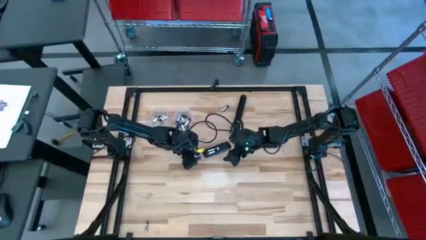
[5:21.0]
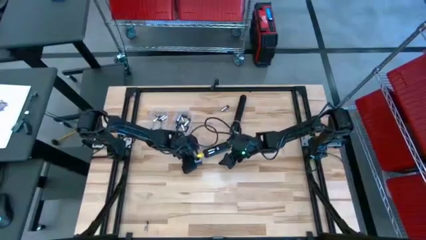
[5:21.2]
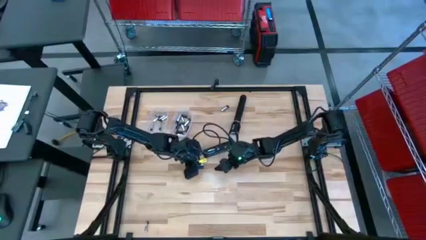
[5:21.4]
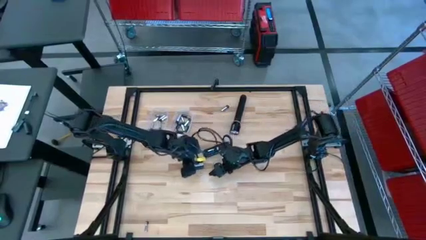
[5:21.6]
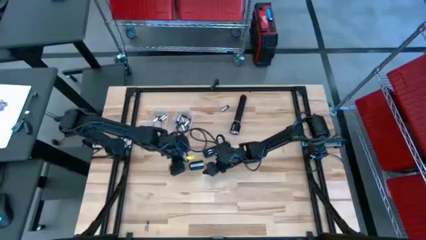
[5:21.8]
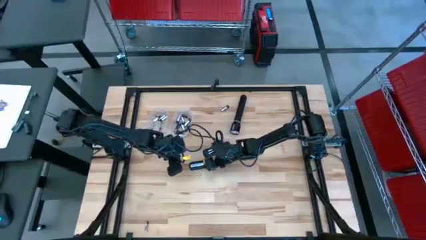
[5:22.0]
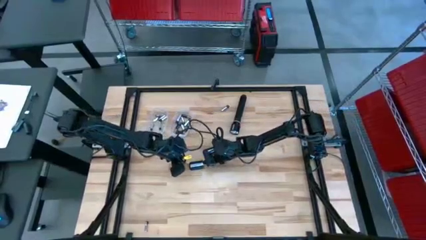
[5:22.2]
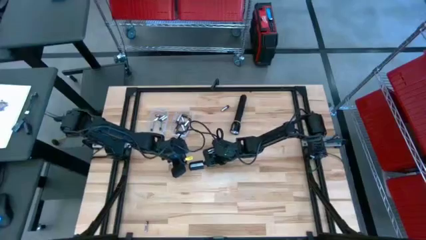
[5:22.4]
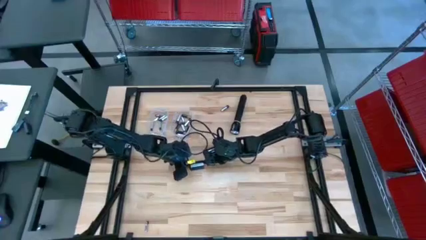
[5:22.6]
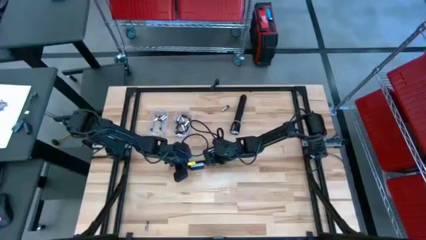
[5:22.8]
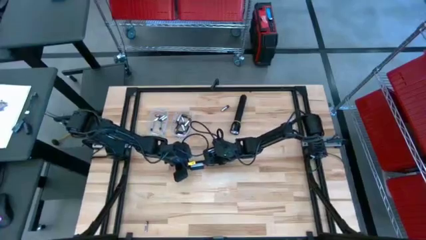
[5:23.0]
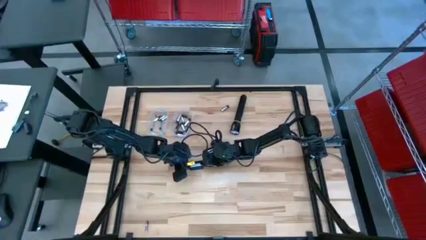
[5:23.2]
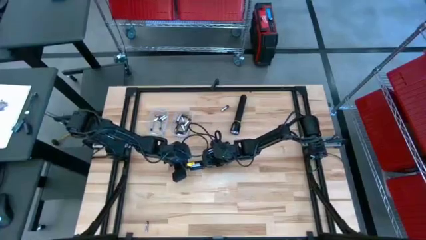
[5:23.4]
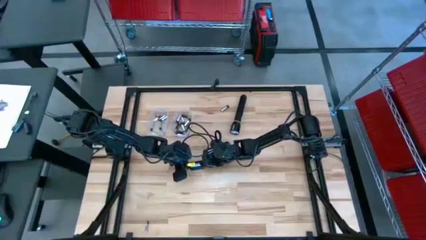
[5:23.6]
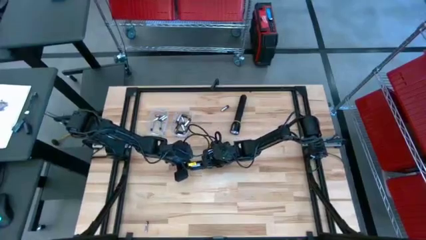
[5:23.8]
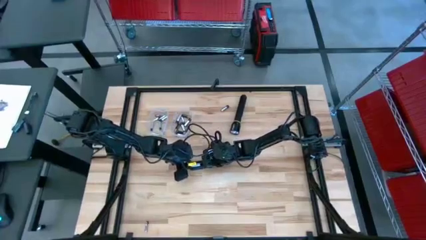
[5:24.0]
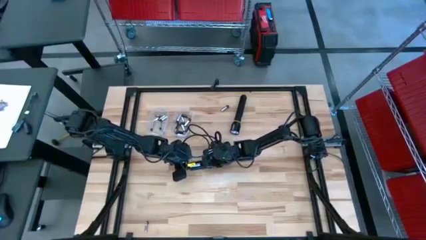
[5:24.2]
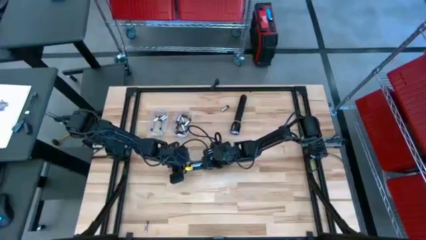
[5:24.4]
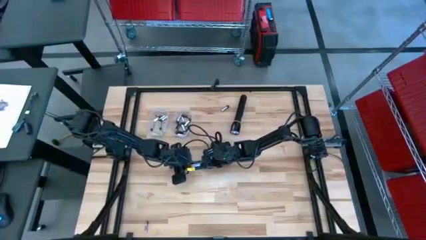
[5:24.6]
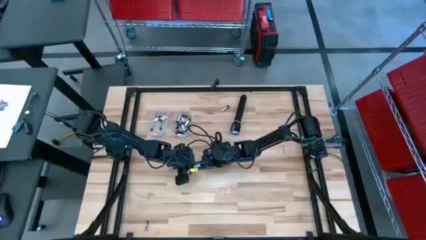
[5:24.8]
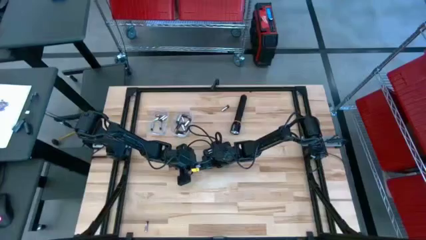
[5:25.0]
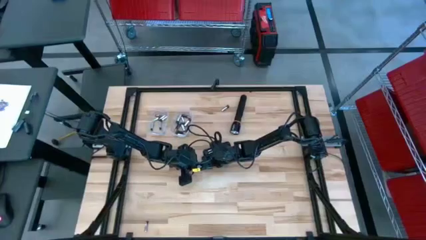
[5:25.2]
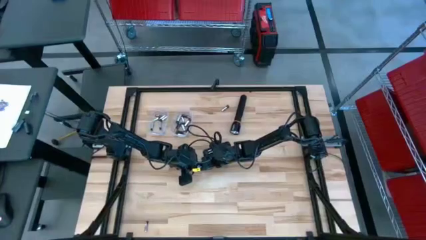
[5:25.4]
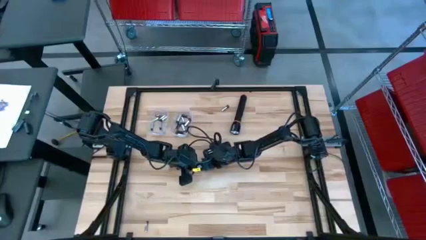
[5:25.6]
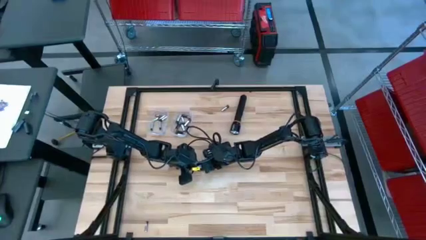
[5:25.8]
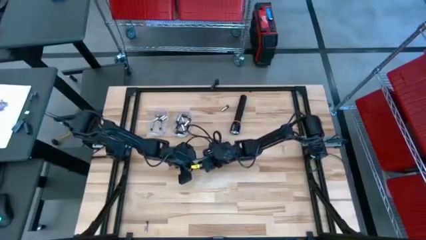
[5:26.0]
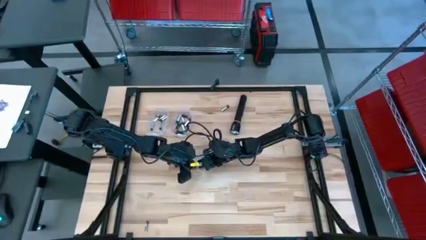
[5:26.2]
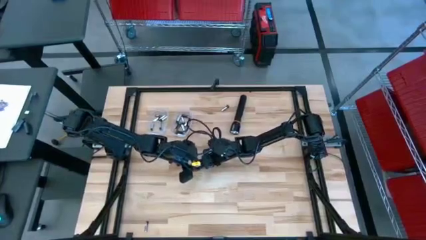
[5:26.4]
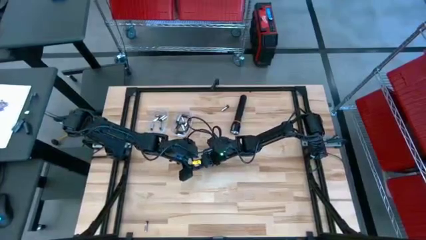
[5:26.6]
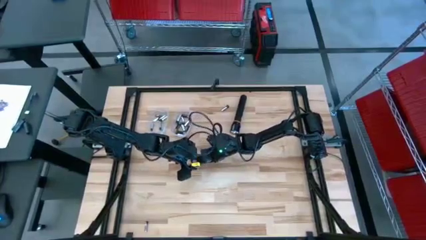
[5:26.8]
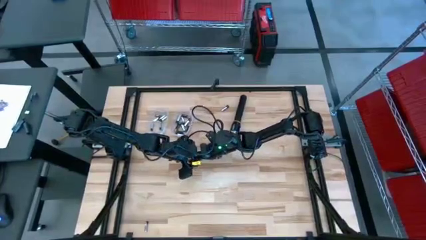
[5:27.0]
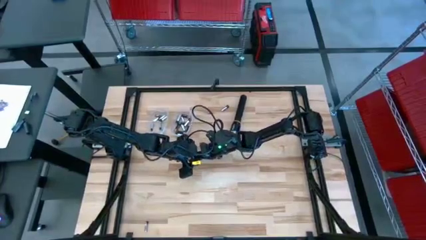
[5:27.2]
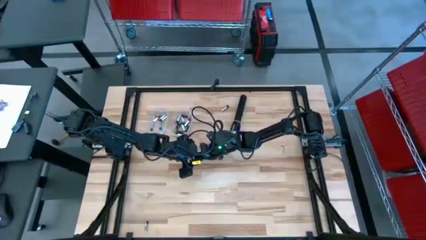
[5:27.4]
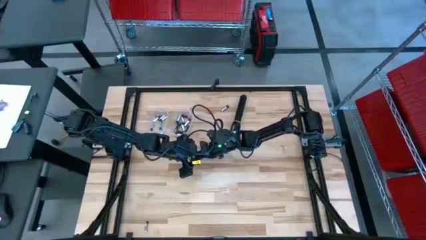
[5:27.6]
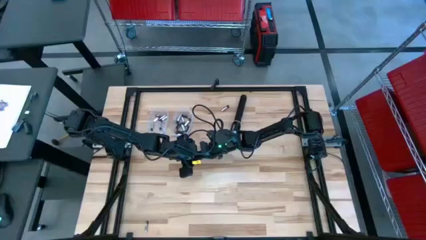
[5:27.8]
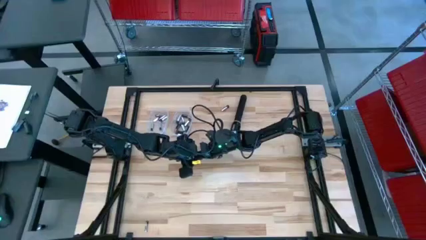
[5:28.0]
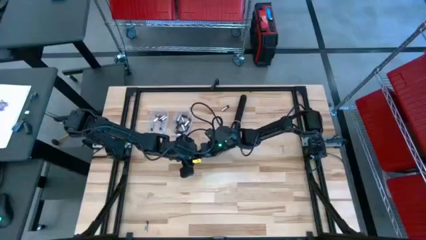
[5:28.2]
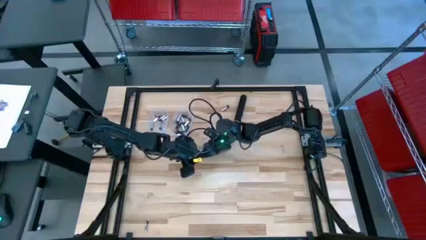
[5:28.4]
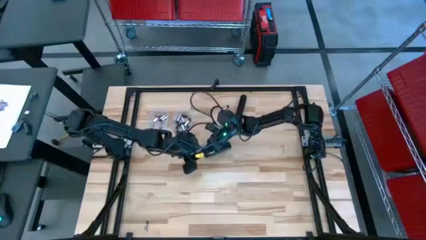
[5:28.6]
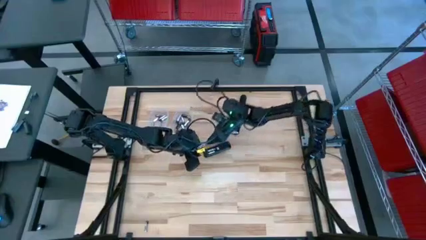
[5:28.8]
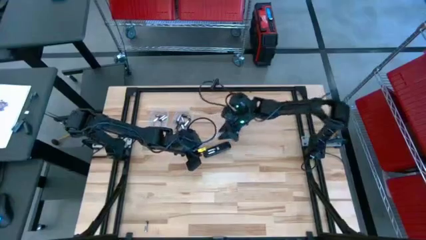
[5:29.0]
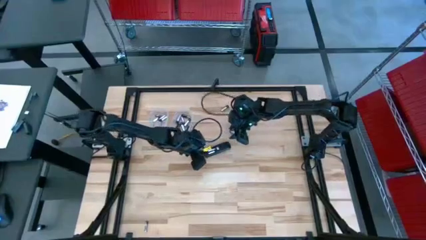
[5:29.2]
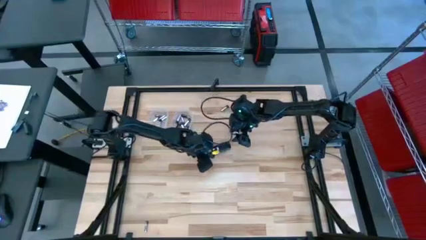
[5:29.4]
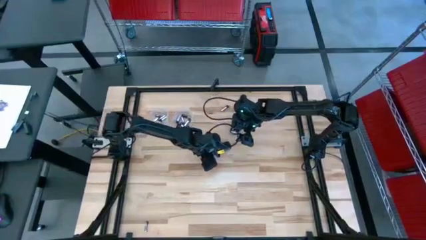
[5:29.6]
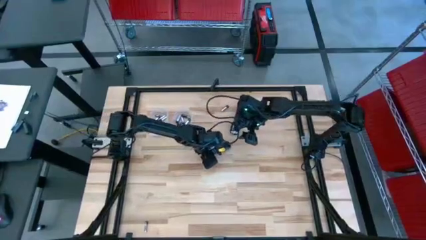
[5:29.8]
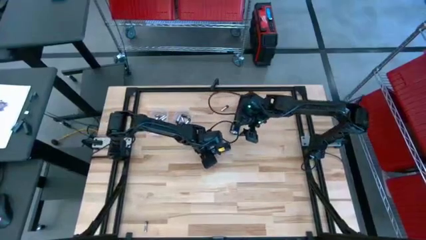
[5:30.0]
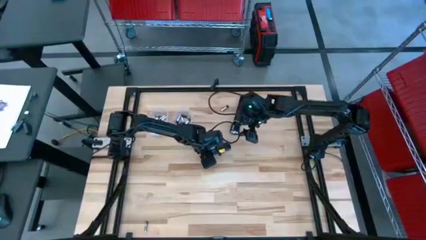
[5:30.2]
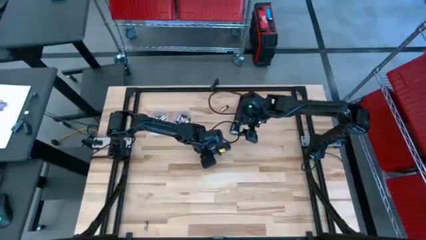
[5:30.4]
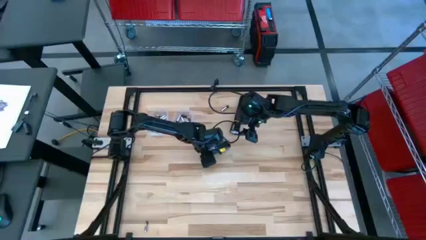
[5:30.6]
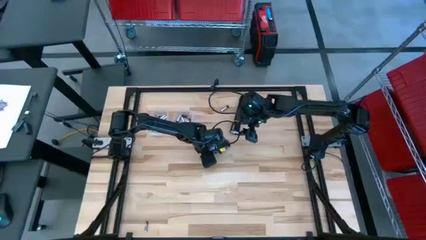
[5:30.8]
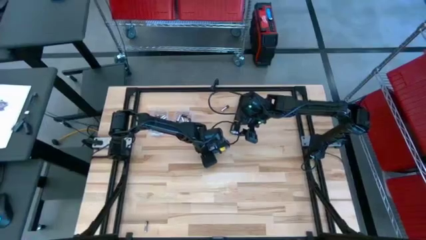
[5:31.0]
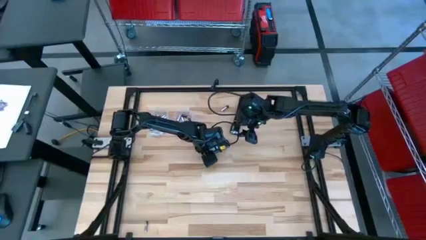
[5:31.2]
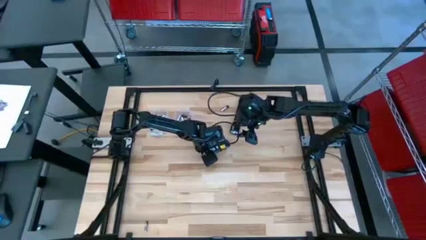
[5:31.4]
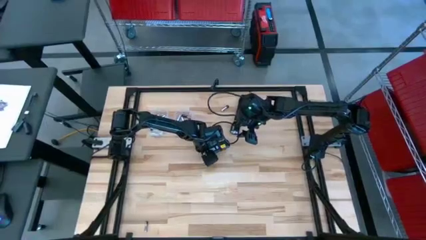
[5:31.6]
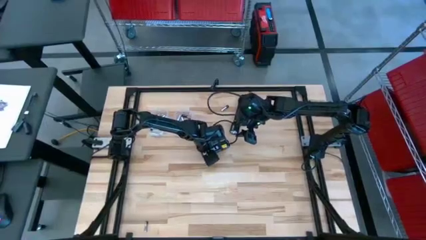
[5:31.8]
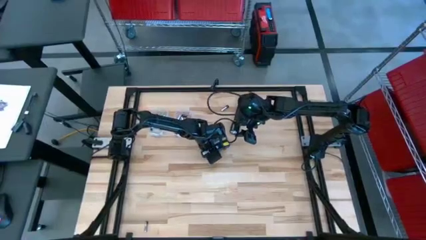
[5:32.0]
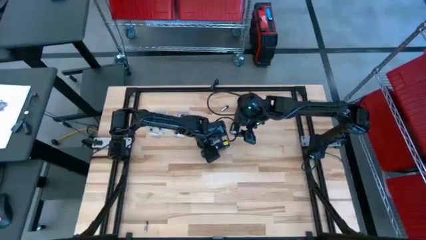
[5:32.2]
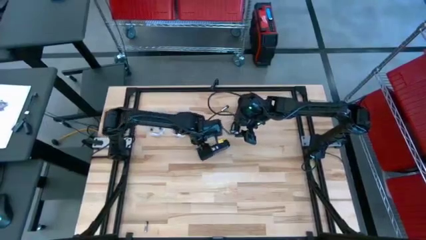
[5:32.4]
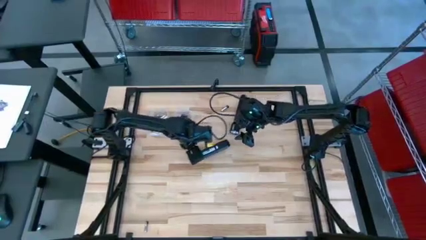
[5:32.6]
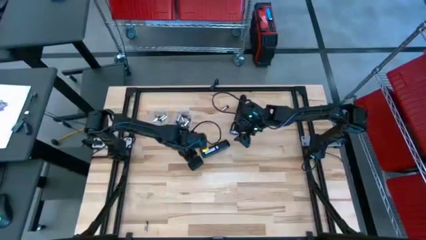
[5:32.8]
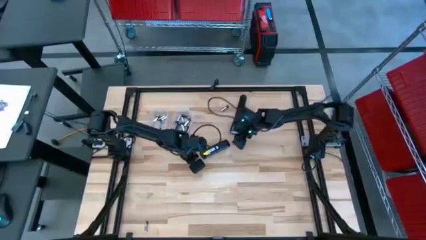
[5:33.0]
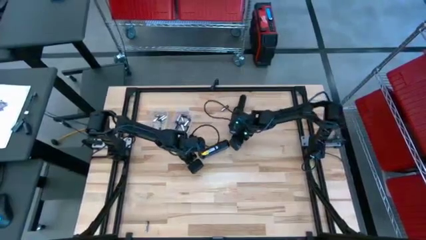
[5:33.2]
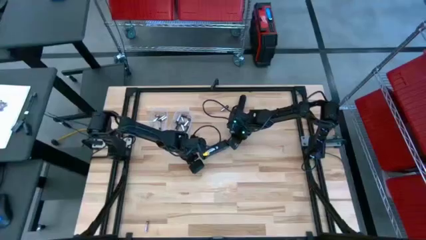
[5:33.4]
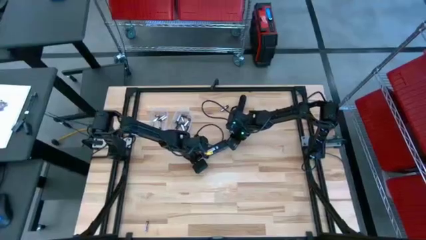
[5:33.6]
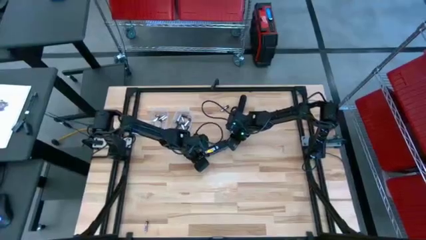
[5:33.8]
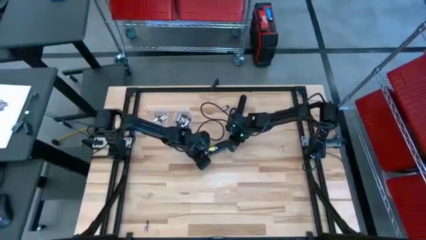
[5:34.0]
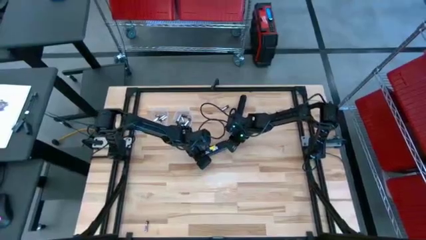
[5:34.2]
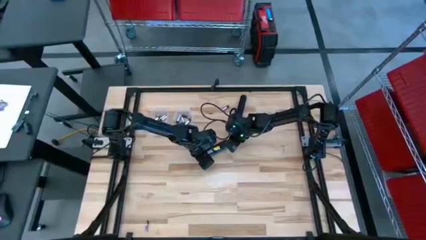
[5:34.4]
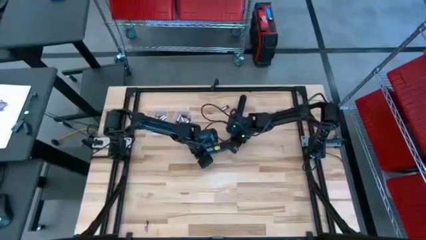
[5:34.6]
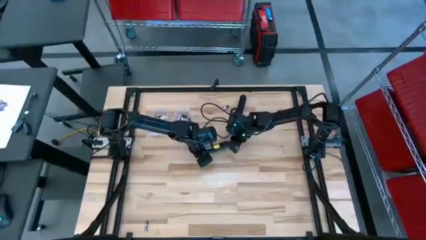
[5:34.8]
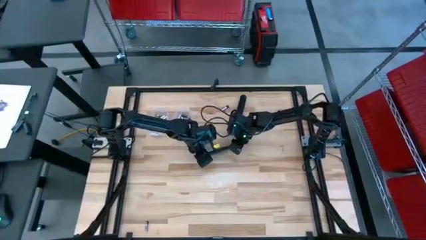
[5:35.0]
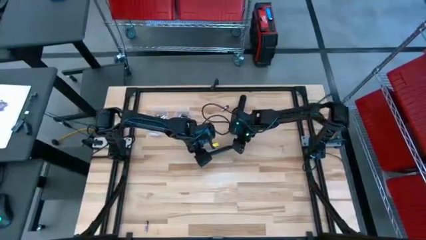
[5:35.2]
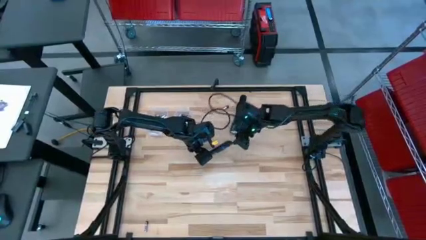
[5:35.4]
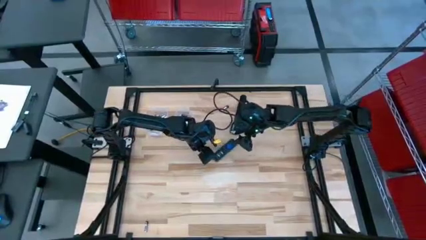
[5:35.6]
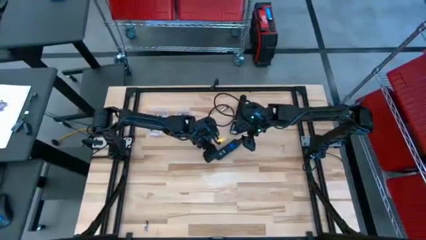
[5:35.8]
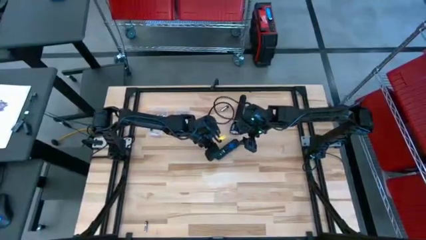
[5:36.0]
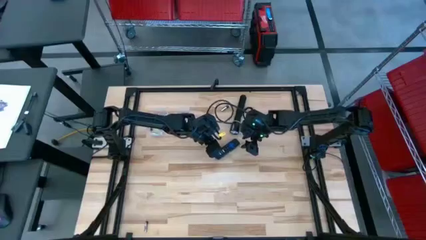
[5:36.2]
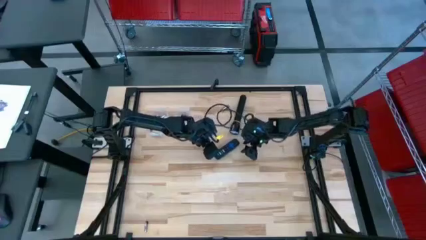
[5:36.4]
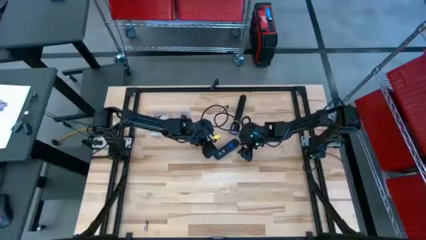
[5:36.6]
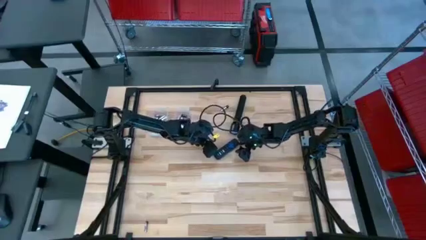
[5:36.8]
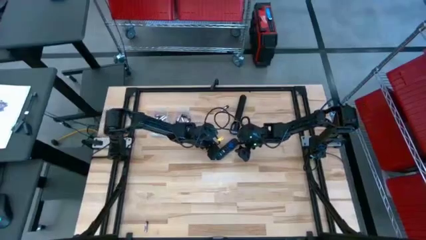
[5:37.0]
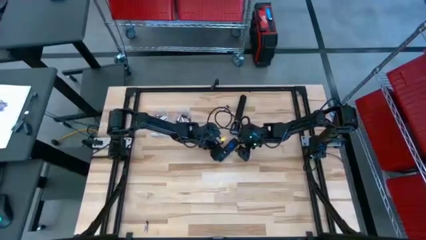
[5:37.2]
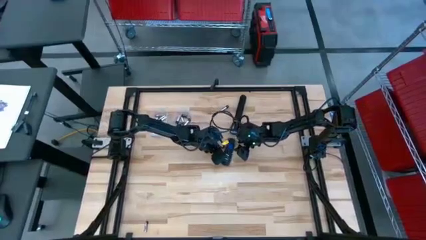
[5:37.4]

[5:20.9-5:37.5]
Task: Insert battery
Close the remote control battery compartment

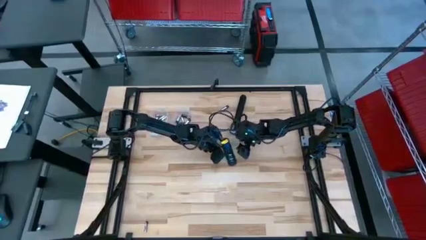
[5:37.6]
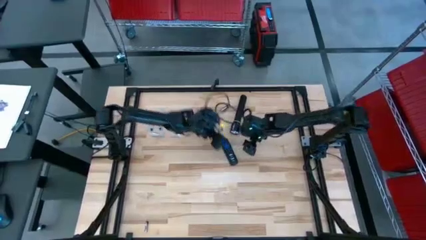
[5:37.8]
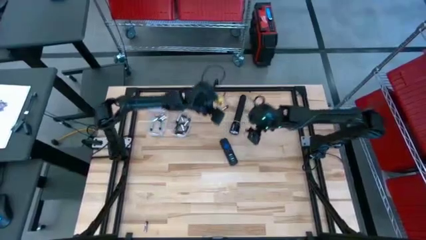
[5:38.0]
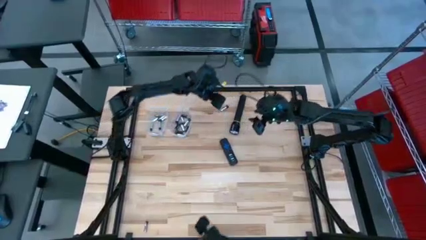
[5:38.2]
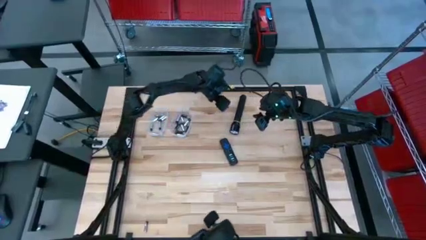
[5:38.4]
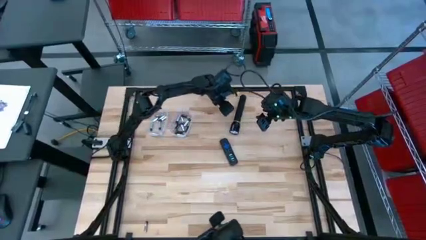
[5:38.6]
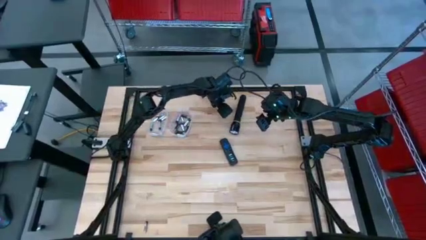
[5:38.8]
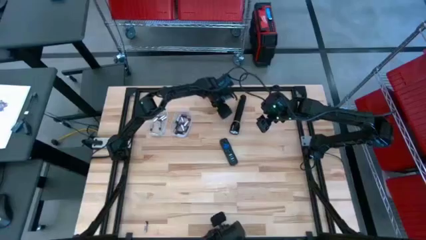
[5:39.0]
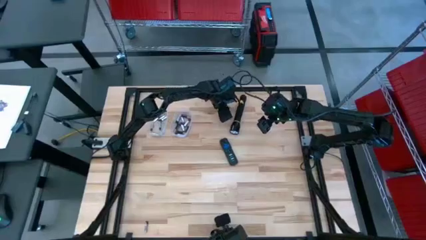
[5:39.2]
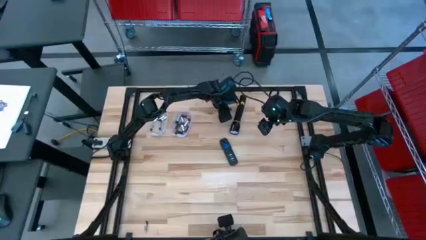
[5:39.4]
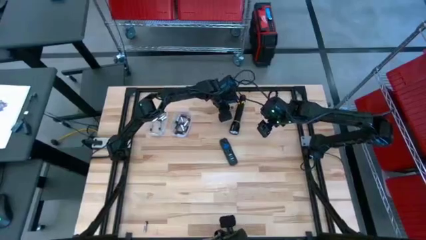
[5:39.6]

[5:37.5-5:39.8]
Put the top silver battery into the right transparent bin
